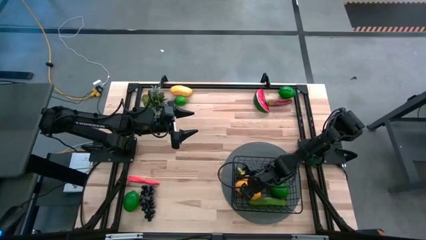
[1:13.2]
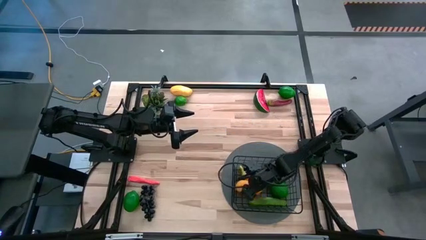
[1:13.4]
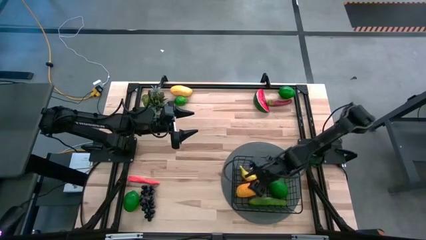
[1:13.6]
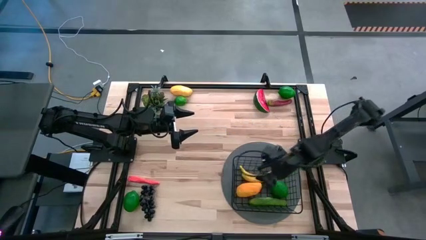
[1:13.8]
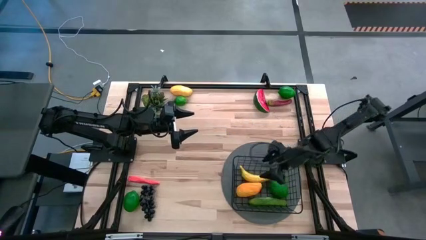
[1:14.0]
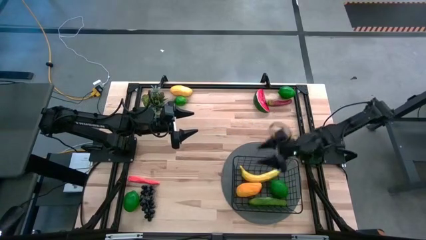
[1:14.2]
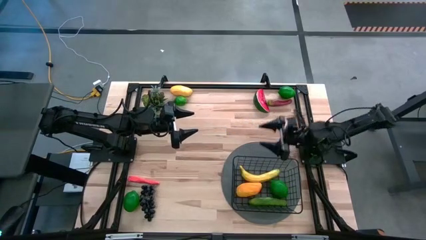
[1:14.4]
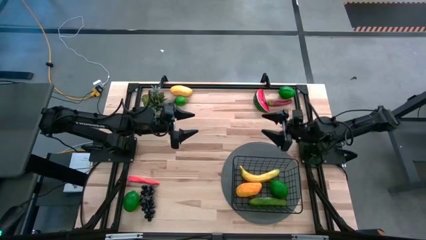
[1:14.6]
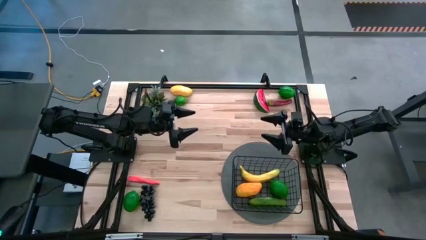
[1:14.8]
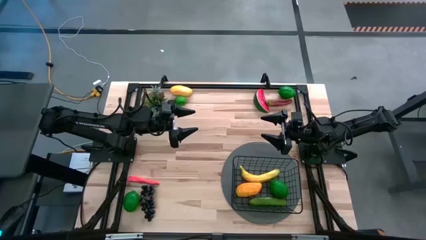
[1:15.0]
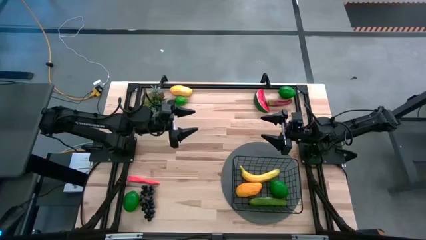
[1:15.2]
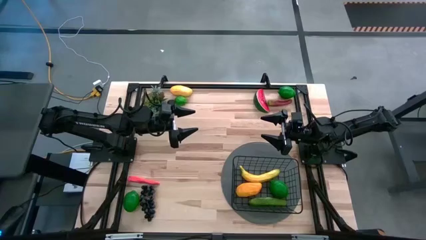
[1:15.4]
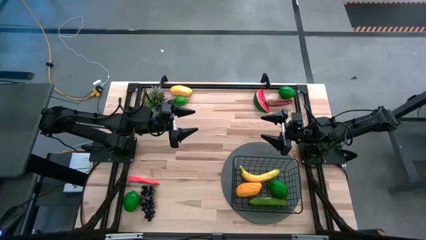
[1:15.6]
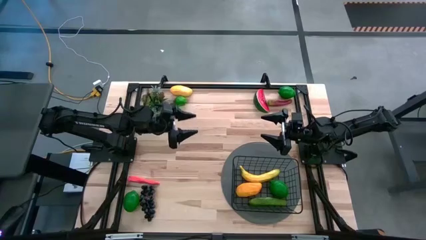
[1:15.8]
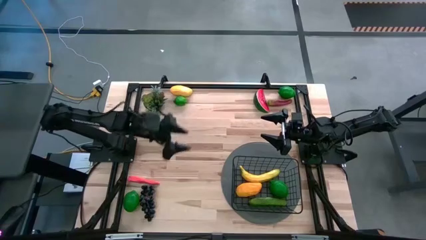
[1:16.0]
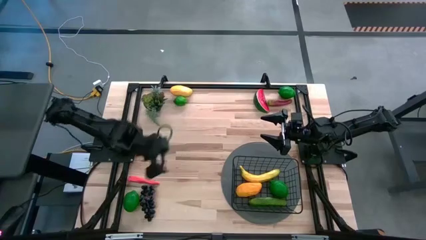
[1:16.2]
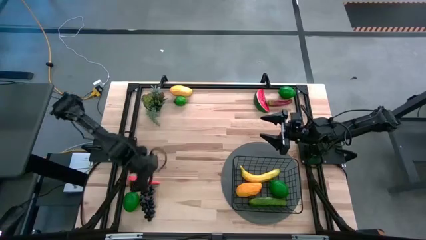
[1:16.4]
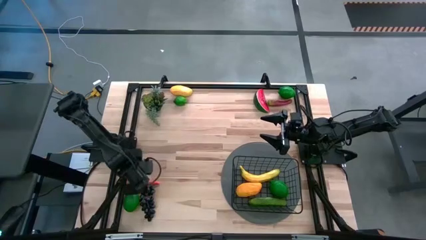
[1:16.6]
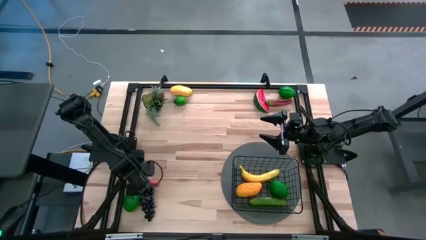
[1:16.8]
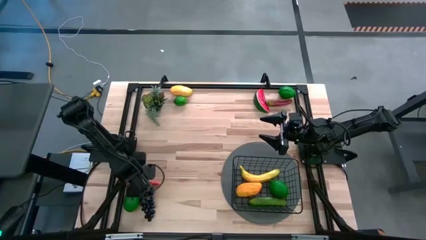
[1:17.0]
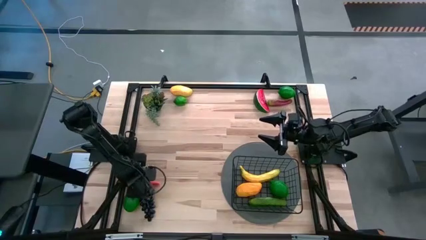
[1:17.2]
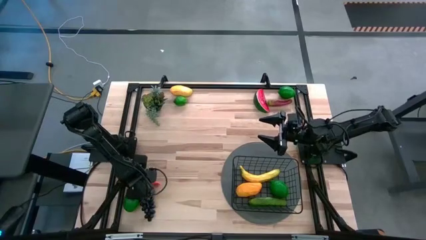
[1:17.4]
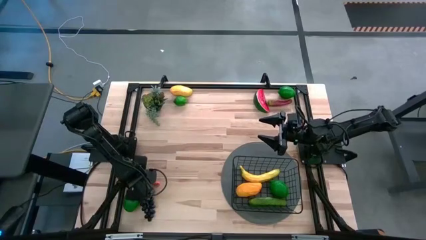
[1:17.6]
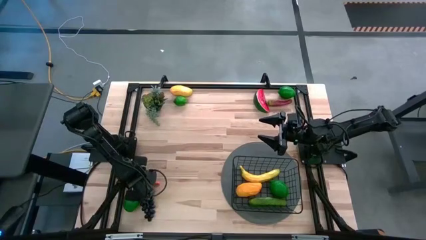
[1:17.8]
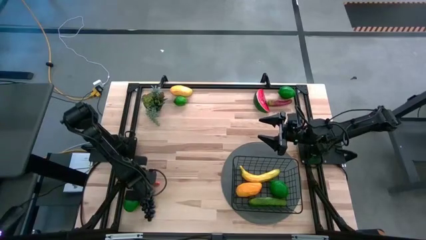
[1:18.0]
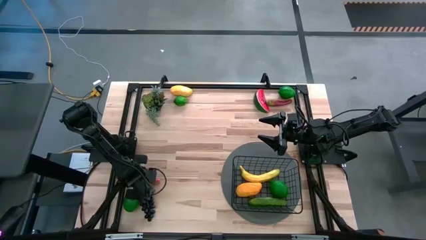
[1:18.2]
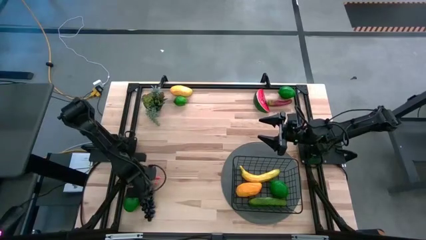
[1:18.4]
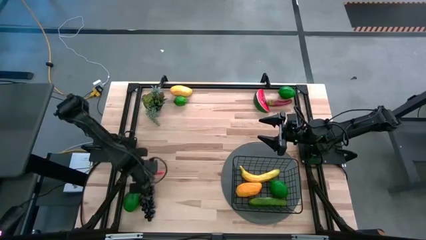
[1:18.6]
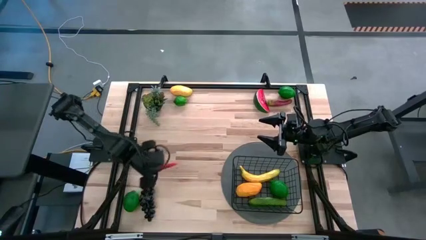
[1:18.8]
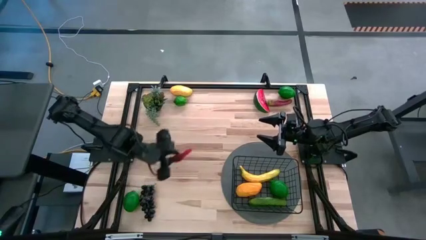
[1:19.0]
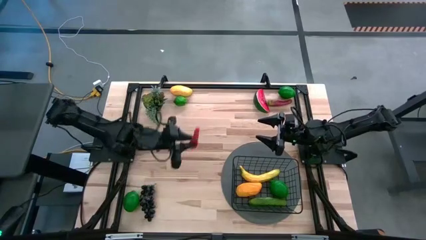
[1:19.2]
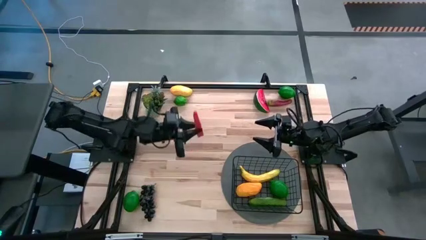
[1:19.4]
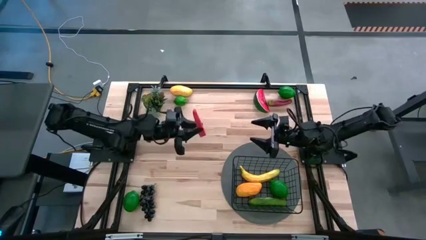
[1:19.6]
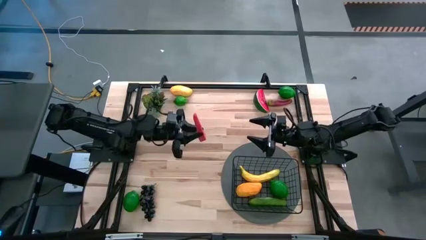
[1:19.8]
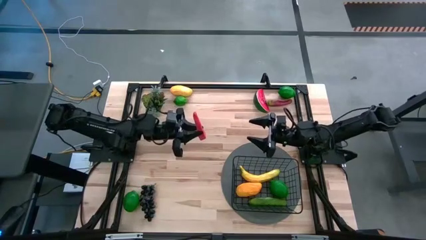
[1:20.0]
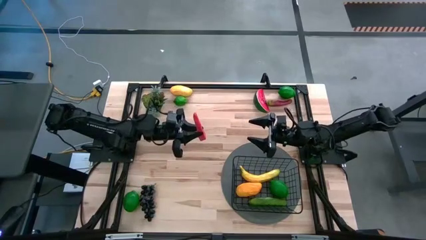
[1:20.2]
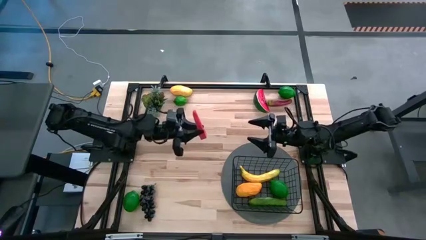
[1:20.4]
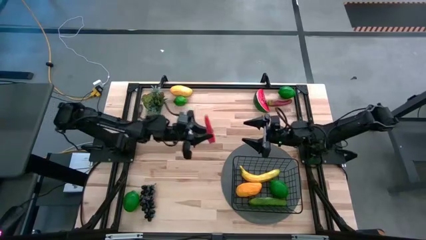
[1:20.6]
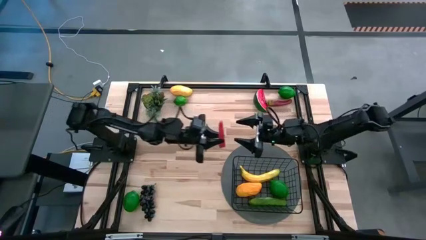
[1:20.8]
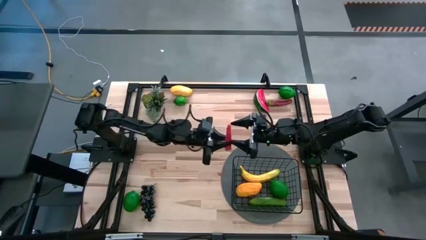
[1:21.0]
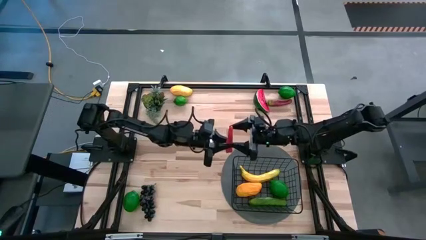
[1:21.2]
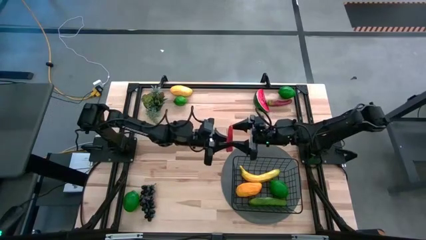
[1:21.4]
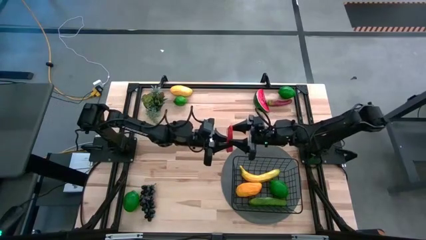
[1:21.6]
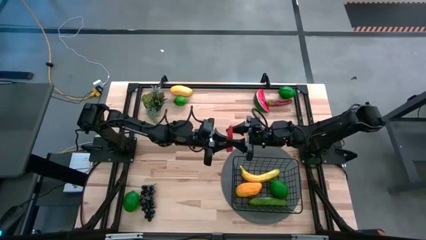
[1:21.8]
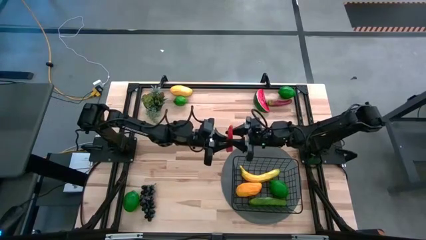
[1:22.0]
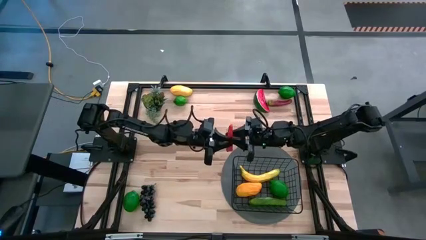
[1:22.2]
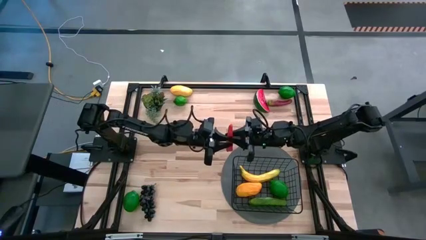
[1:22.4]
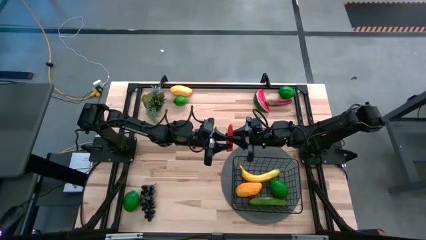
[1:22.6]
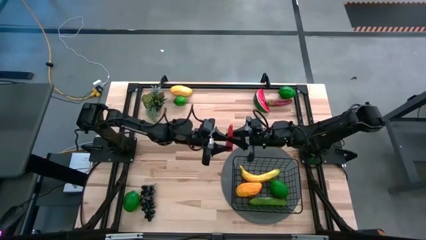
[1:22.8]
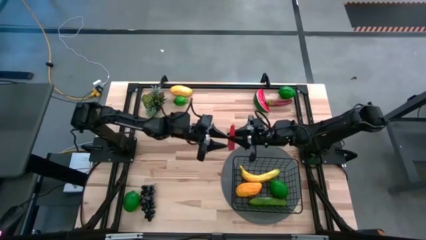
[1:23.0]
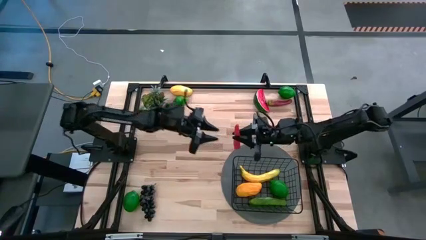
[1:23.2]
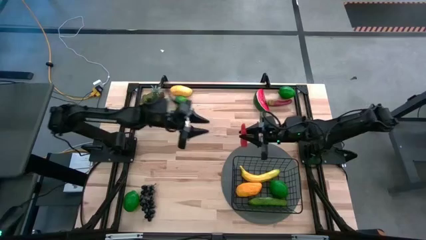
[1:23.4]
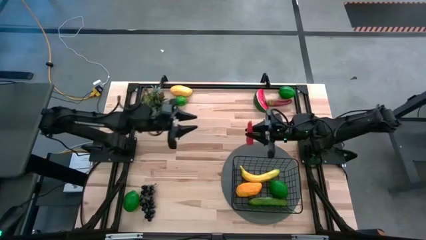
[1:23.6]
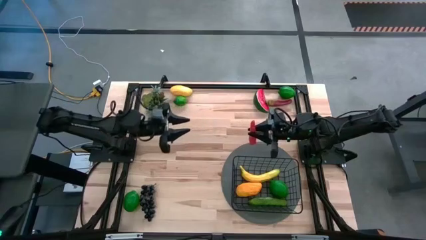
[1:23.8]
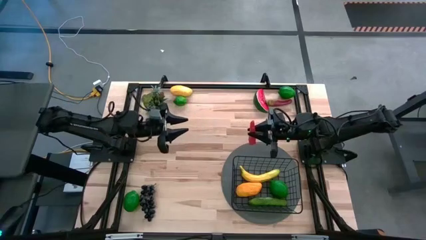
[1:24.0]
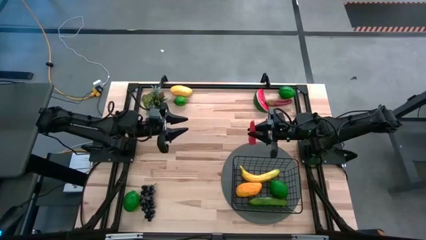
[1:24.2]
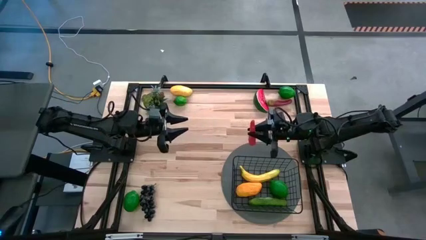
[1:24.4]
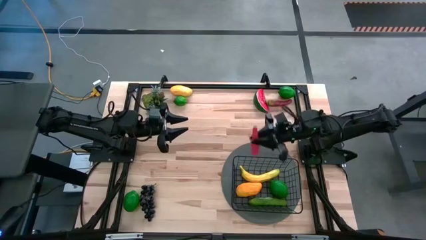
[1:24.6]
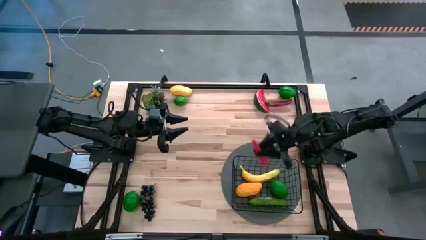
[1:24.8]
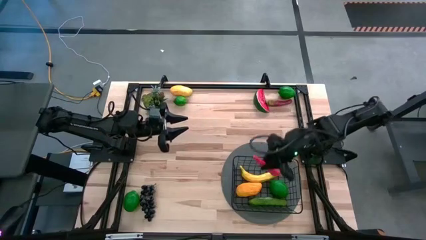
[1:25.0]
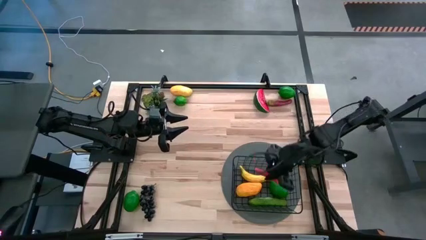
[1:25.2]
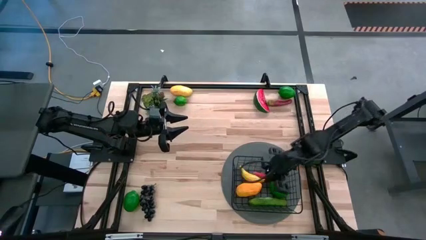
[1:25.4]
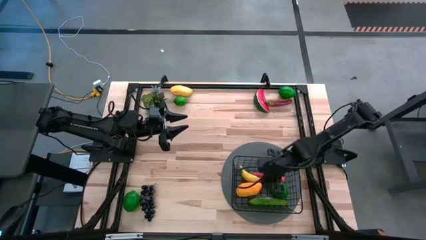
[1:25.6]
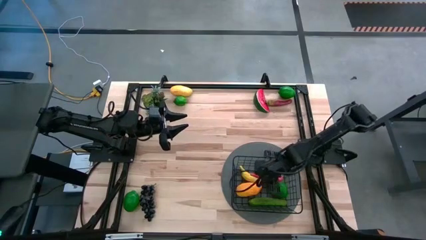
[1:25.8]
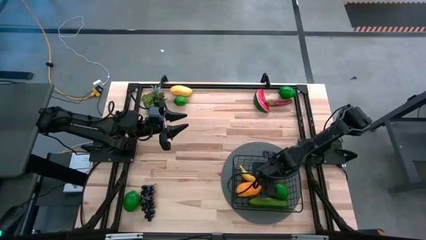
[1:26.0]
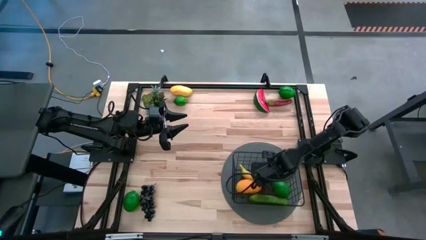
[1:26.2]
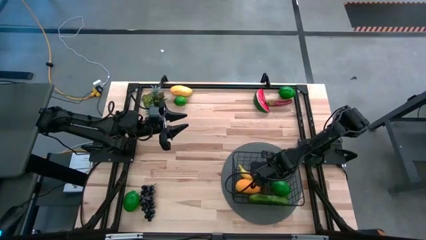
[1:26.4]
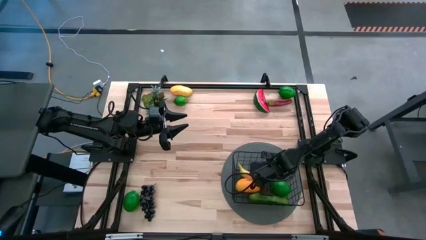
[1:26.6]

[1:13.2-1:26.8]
Task: Build produce basket
Put the orange carrot into the black basket

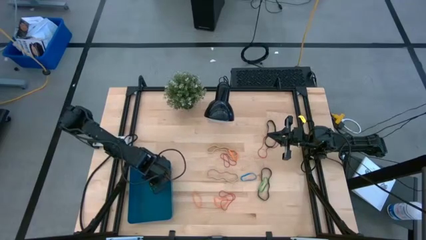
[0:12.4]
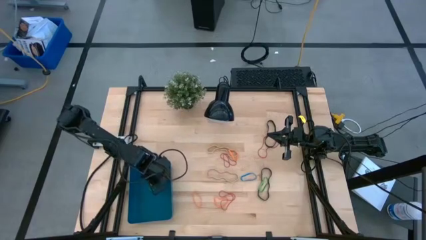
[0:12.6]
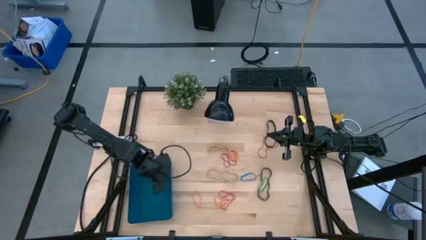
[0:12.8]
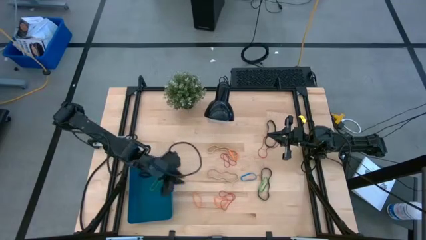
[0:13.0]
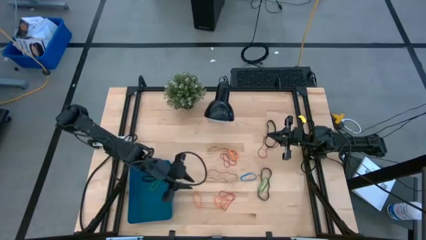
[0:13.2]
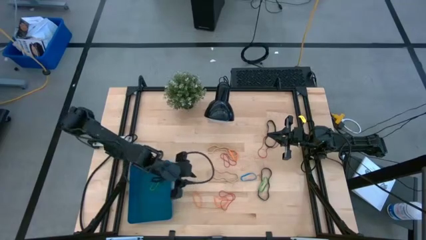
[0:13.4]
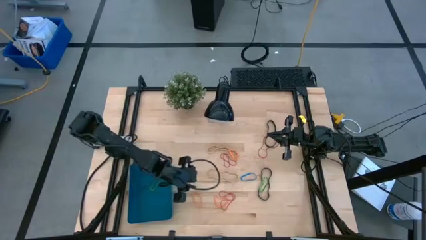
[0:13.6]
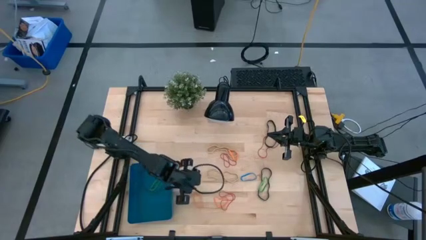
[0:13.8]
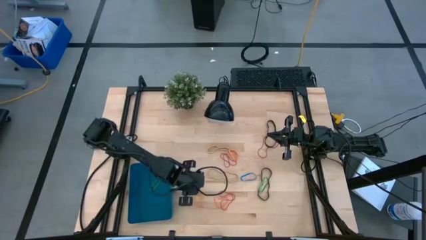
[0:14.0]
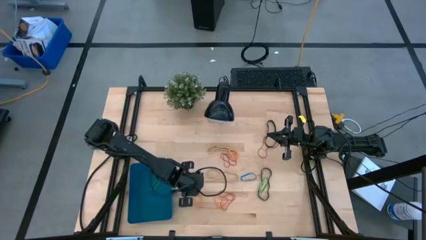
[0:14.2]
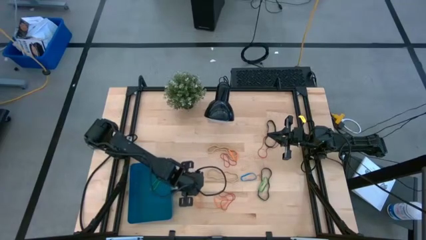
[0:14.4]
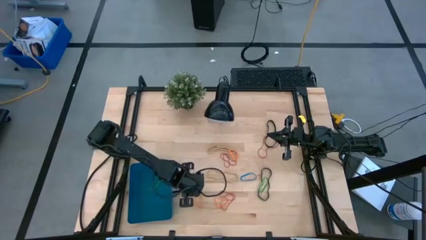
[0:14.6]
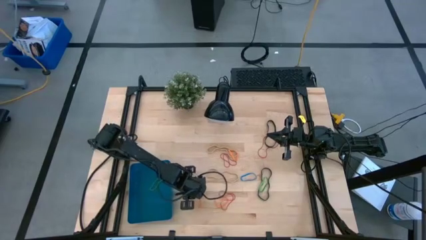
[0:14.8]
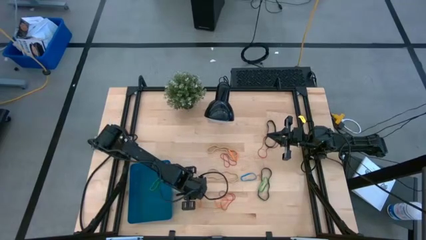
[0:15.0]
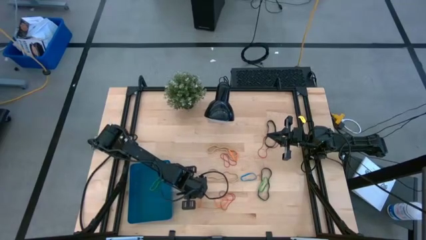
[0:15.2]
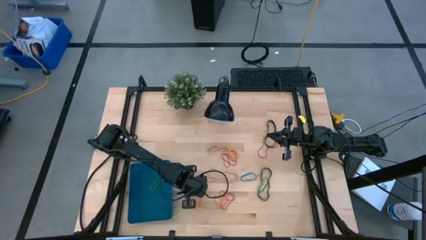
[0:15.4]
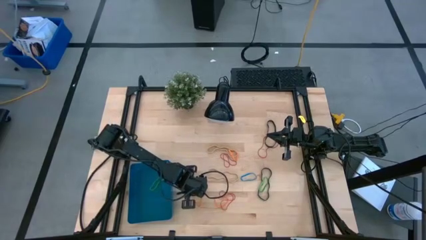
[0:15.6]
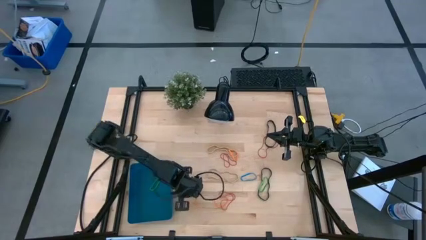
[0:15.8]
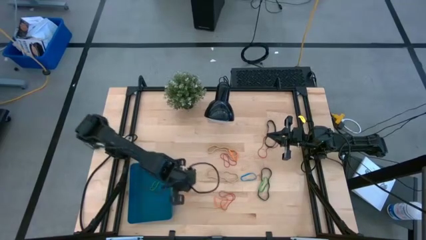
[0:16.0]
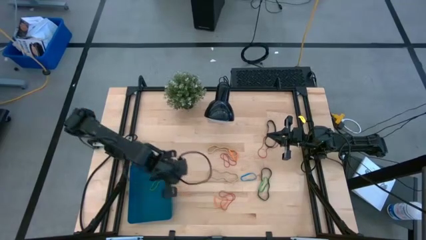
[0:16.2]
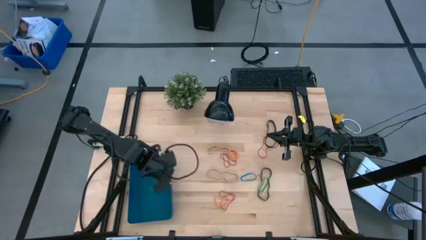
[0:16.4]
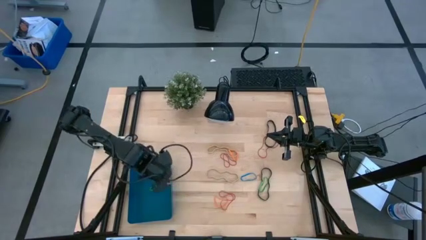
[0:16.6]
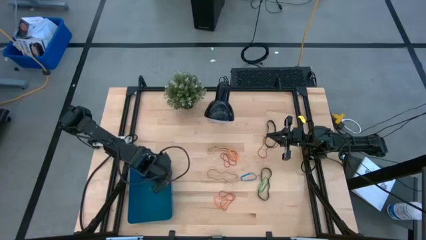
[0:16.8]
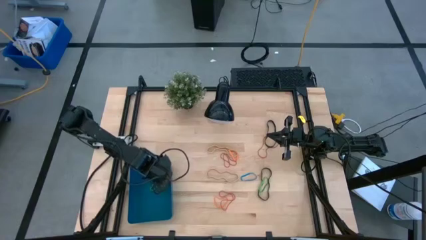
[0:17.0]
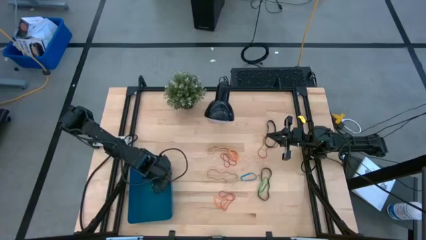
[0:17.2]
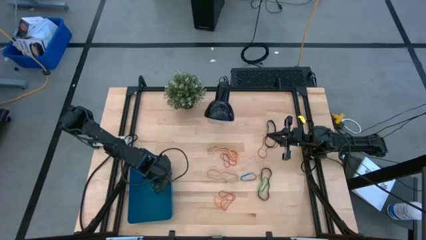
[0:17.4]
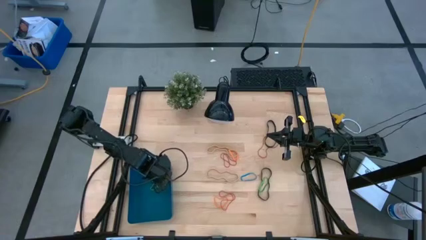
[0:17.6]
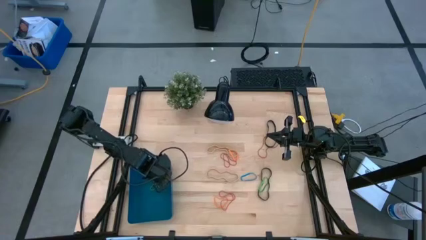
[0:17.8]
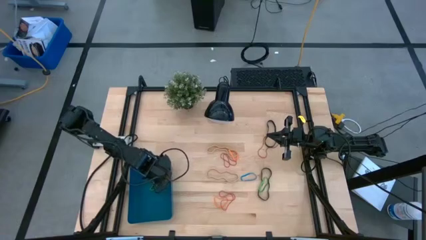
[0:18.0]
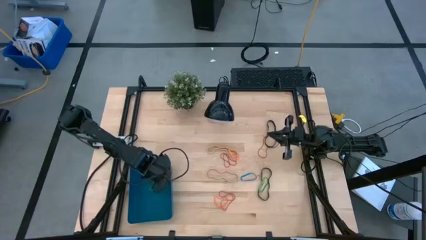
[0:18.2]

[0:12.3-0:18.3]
Task: Pick and place rubber bands into bin
Put the bottom left orange rubber band into the blue bin
